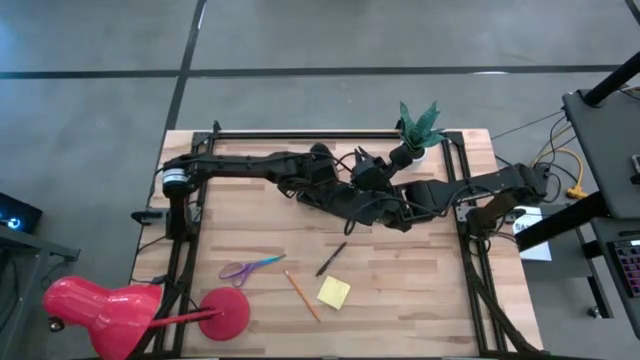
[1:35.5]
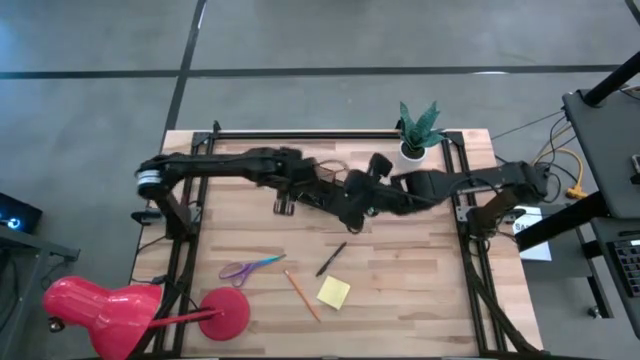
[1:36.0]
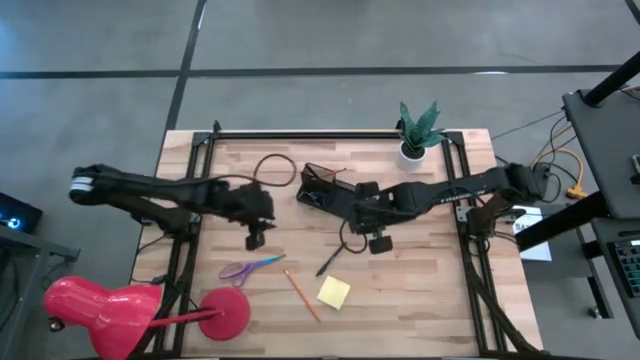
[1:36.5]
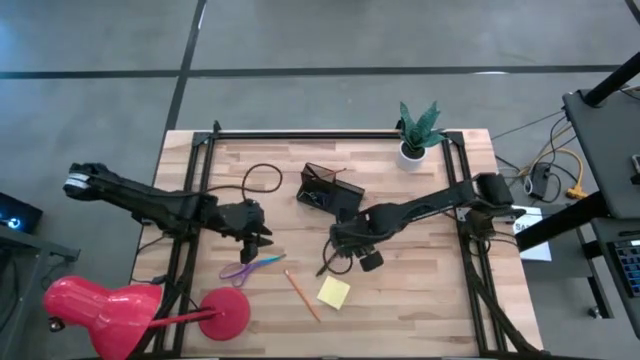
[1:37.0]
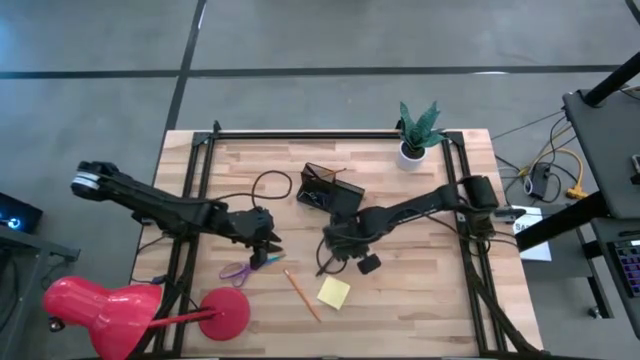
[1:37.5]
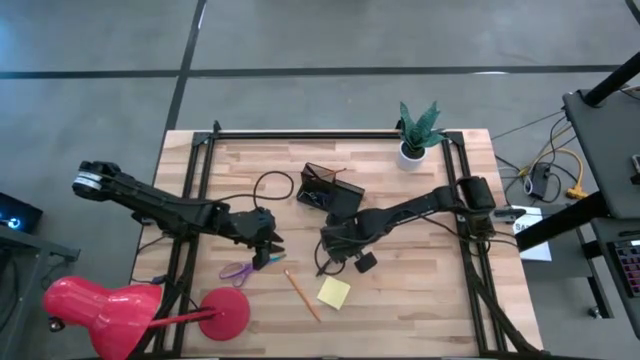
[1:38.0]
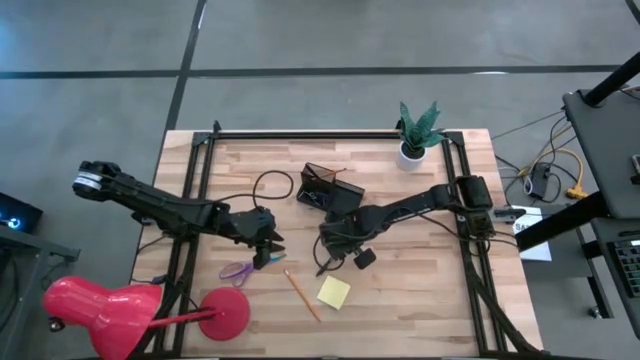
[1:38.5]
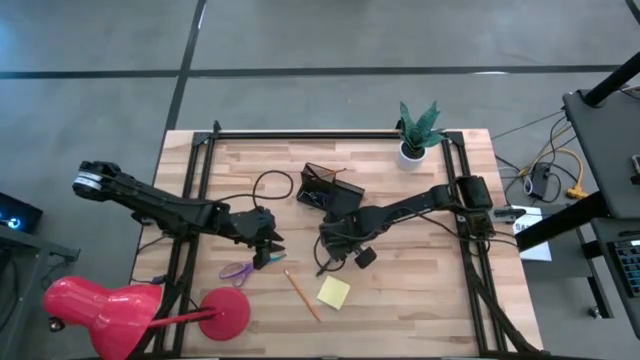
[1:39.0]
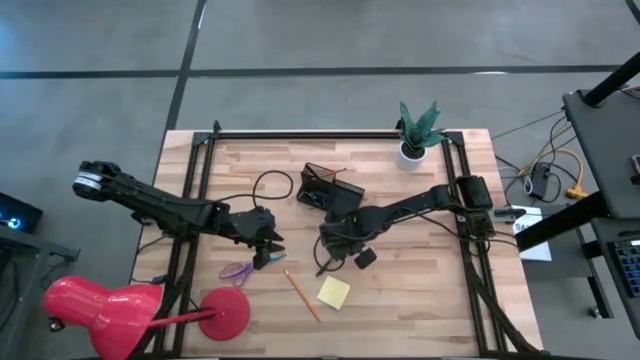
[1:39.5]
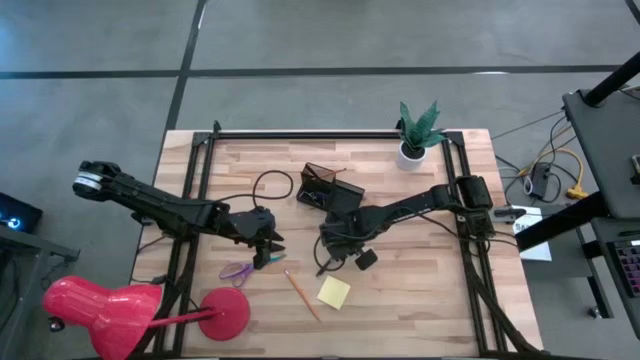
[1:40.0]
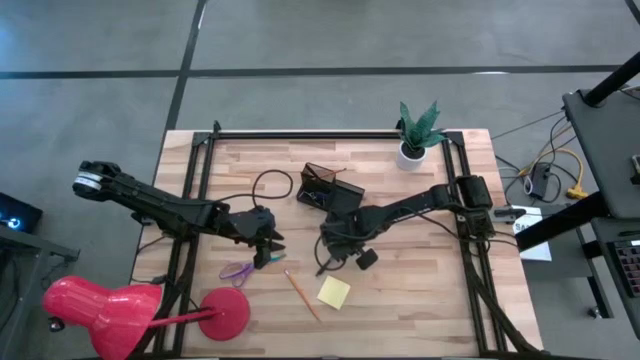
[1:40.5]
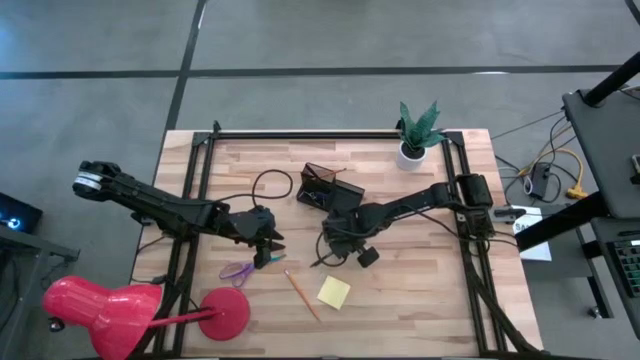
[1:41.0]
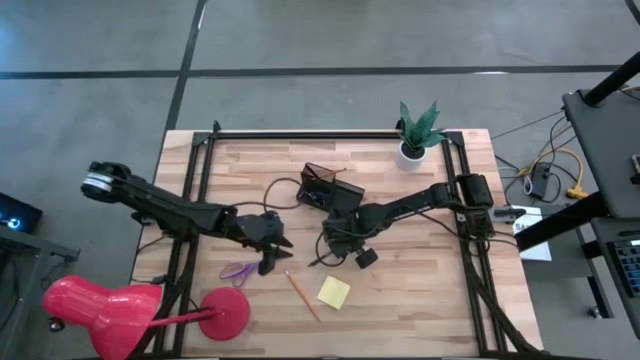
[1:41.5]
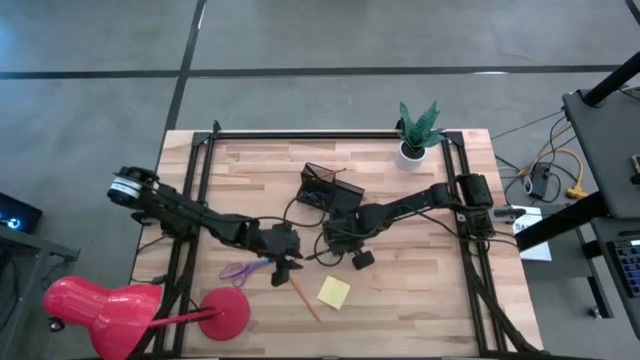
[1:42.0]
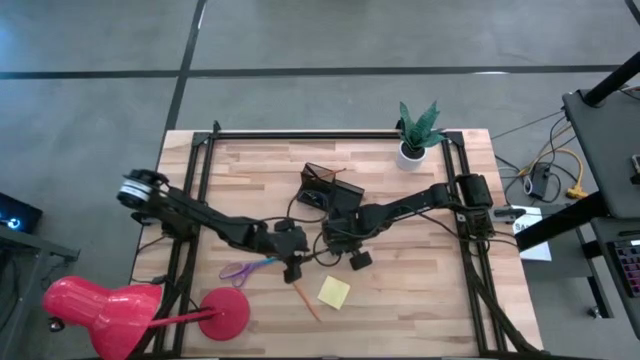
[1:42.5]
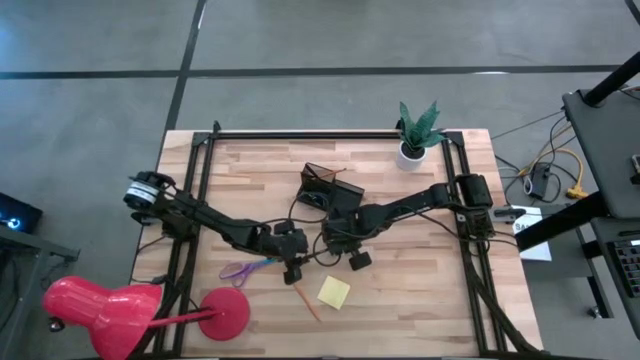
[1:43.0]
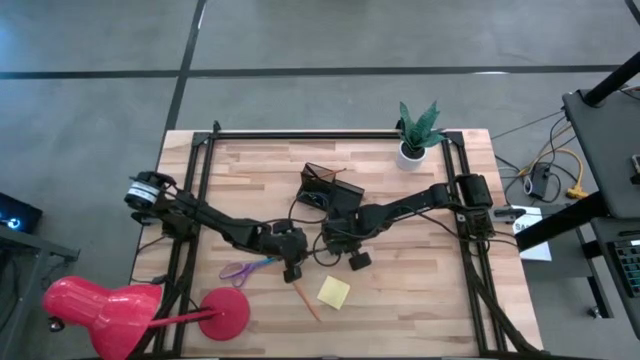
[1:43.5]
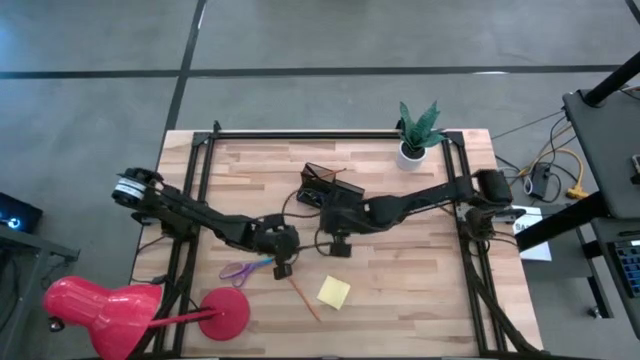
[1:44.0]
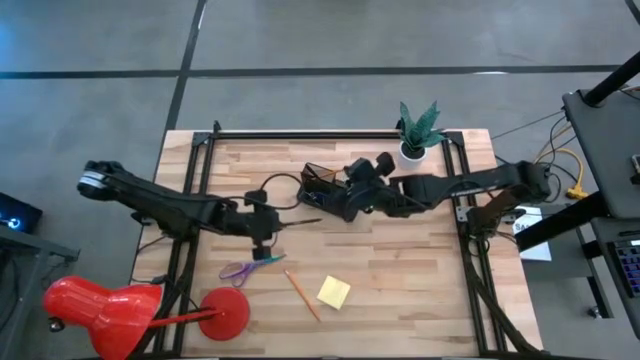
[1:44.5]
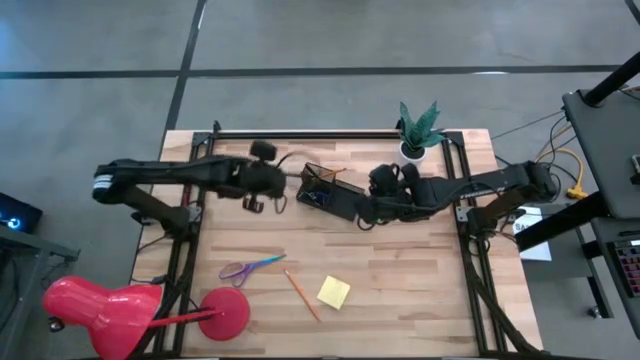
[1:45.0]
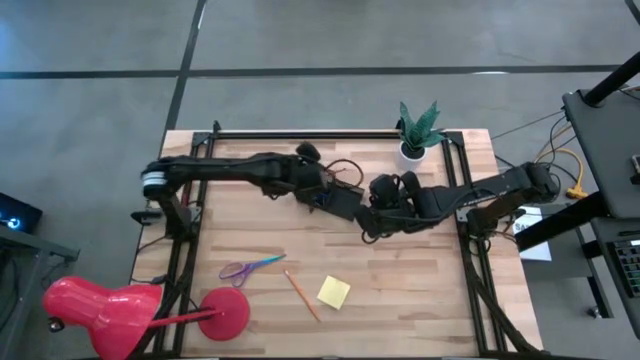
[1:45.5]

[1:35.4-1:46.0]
Task: Pick and place office supplies into organizer
Put the pen into the desk organizer

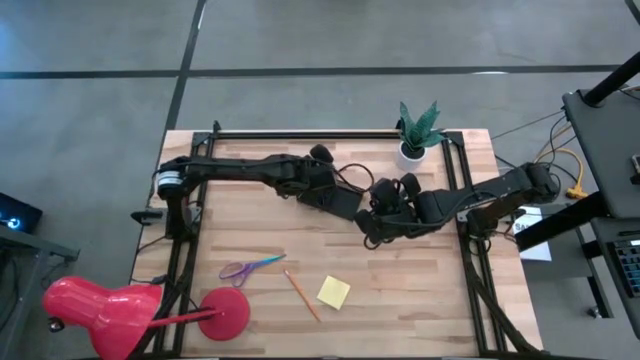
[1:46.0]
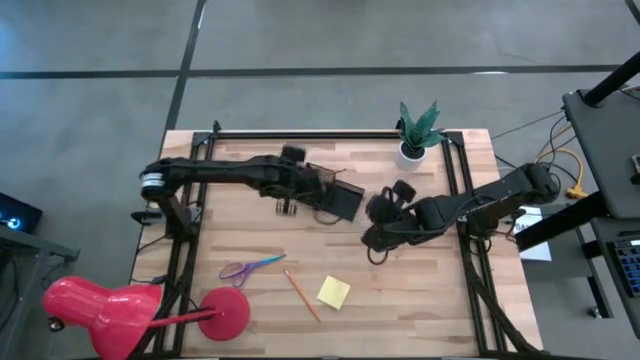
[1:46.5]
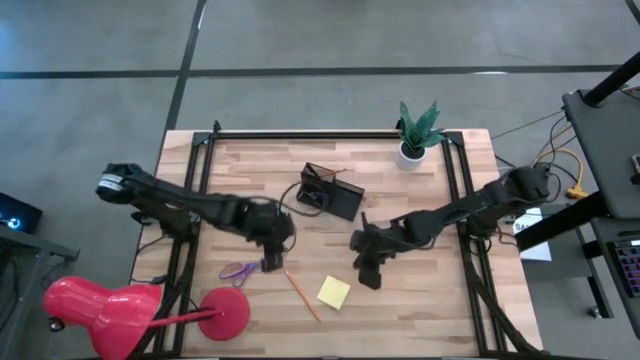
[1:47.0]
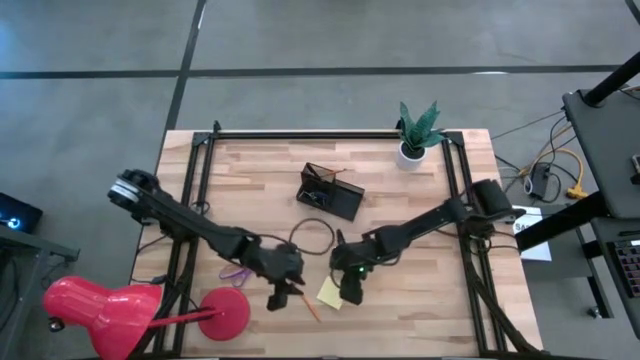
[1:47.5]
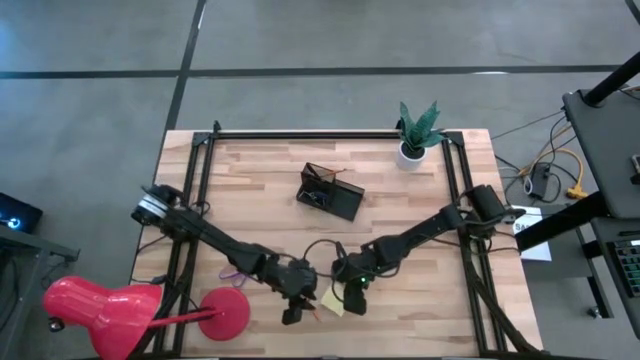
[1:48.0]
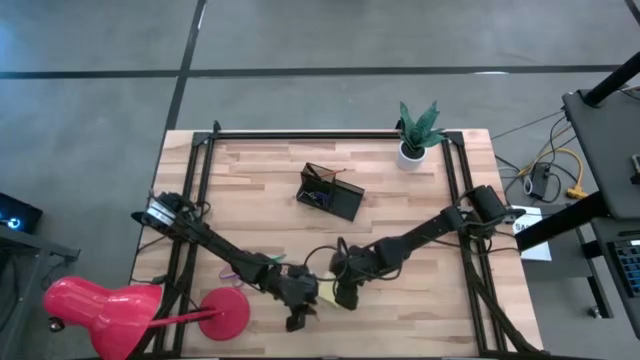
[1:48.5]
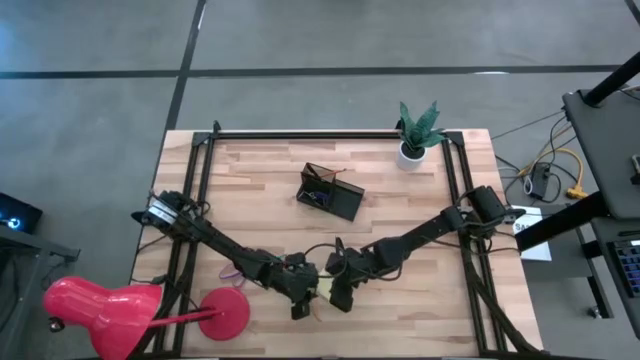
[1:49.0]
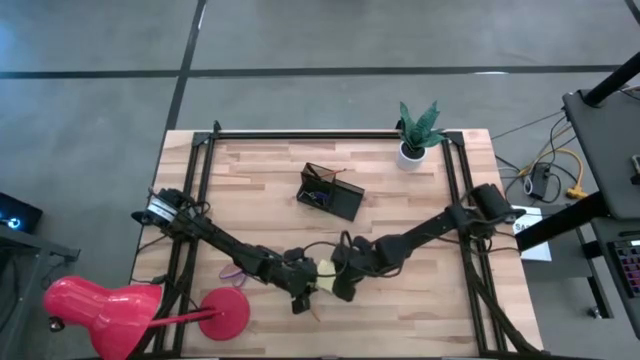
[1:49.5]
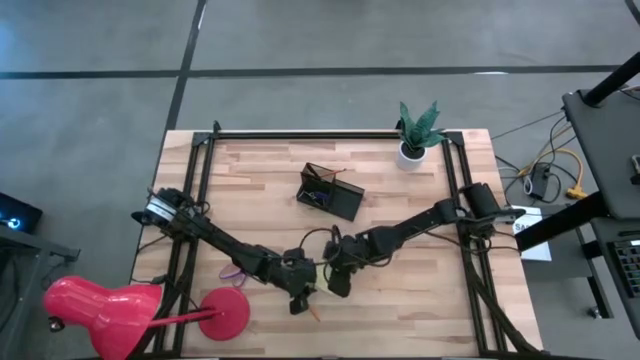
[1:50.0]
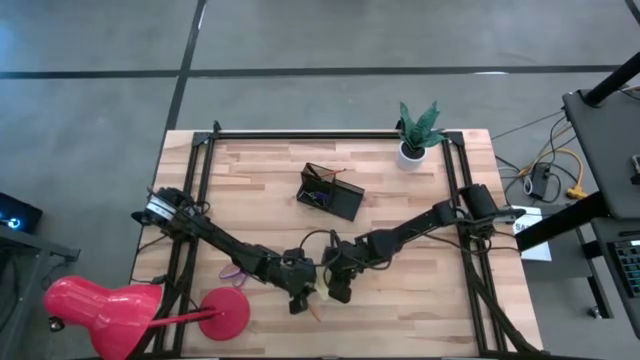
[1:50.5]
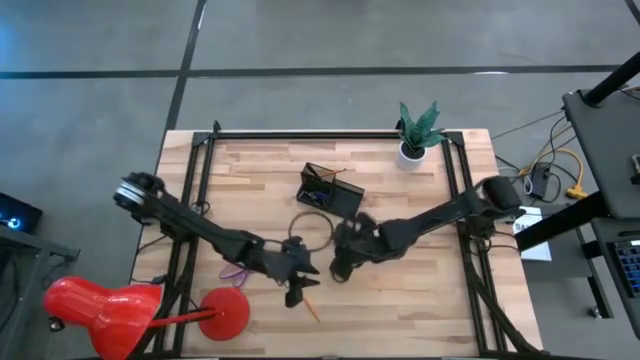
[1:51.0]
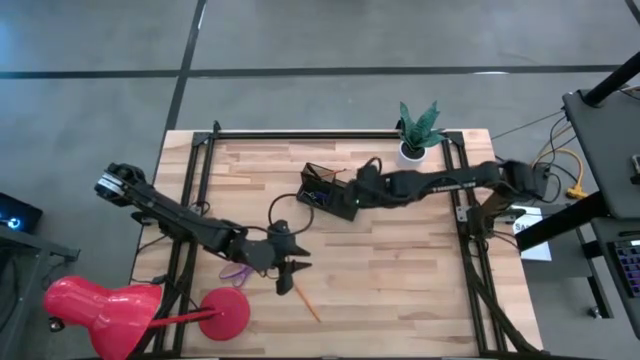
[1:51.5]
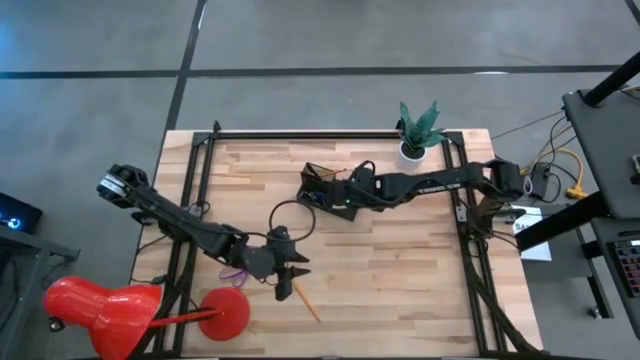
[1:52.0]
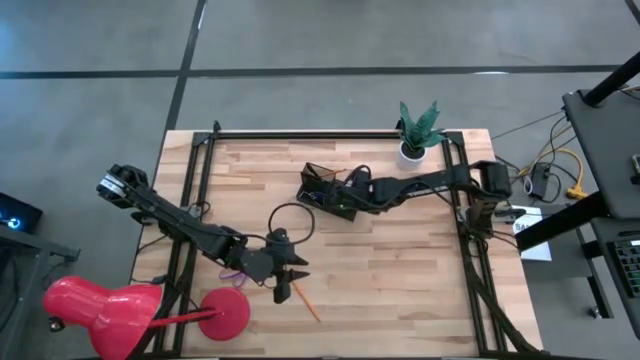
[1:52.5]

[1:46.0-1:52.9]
Put the sticky note into the desk organizer

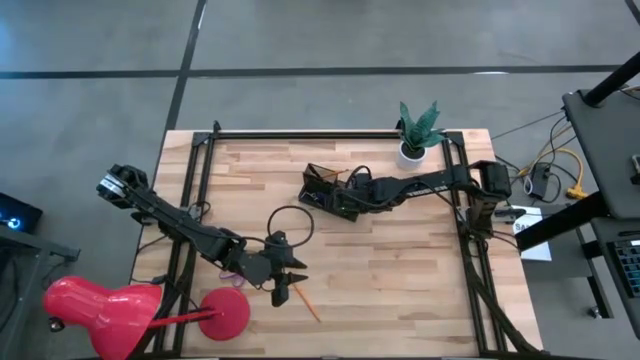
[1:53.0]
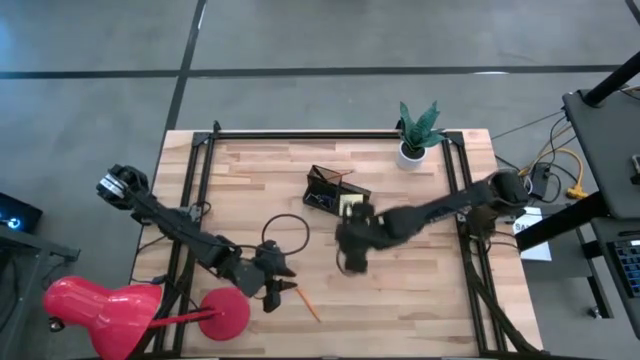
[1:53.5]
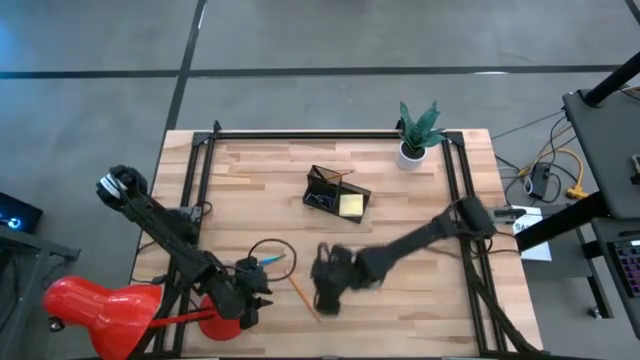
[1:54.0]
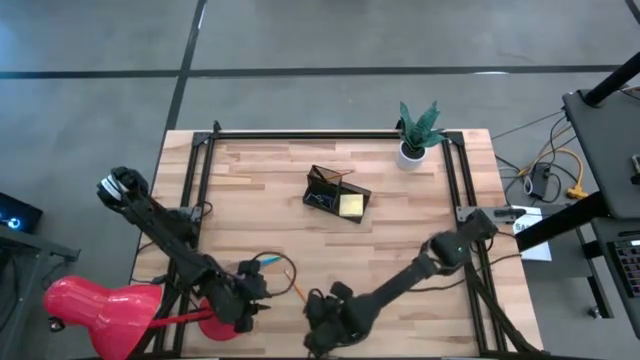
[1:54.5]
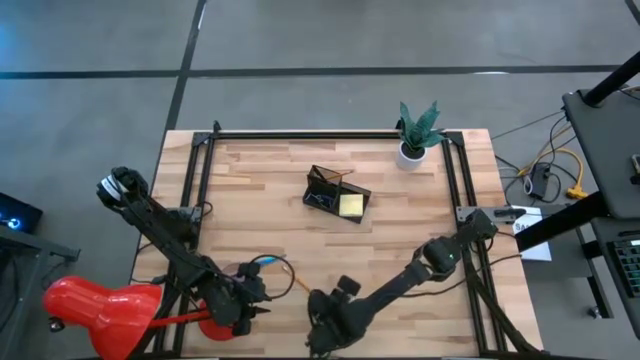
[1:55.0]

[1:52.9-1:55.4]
Put the pencil into the desk organizer
